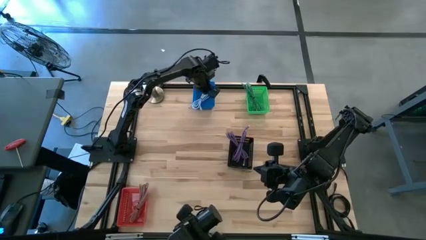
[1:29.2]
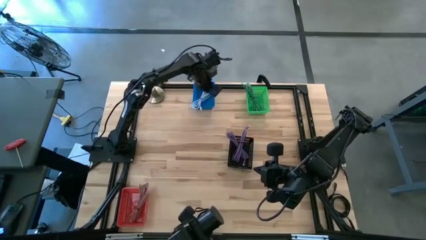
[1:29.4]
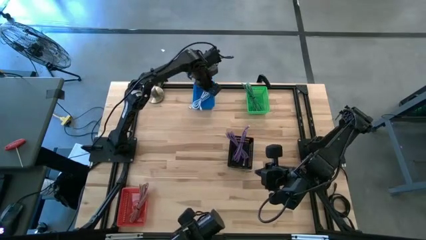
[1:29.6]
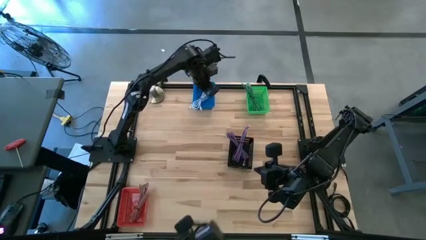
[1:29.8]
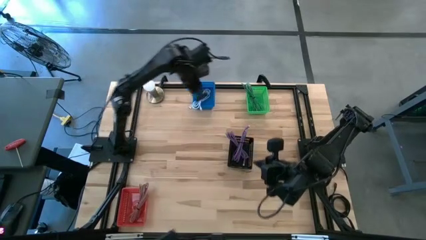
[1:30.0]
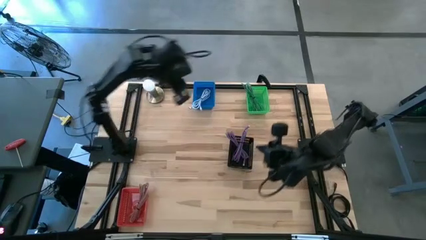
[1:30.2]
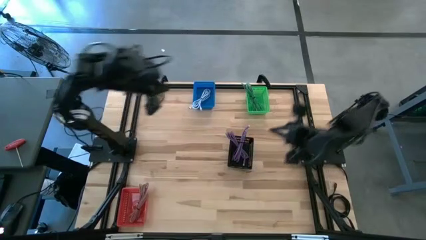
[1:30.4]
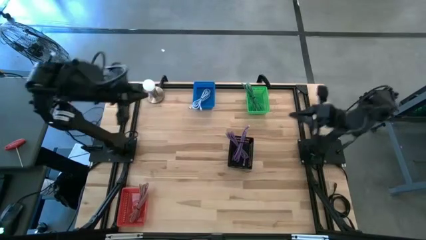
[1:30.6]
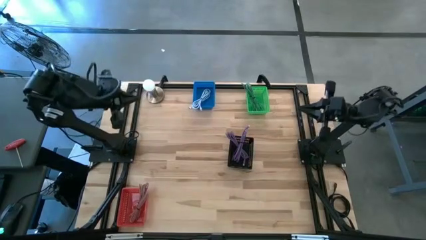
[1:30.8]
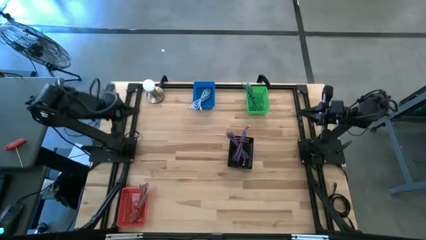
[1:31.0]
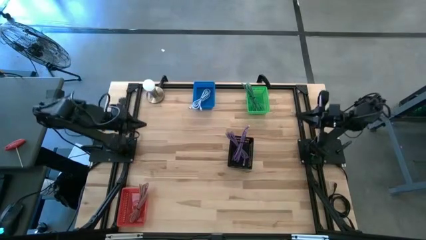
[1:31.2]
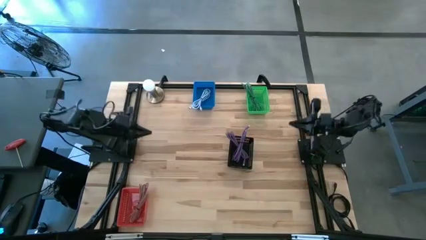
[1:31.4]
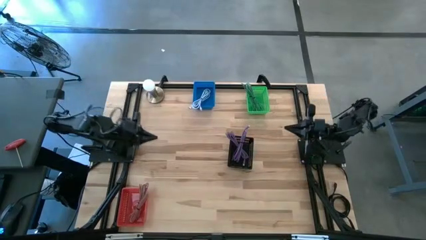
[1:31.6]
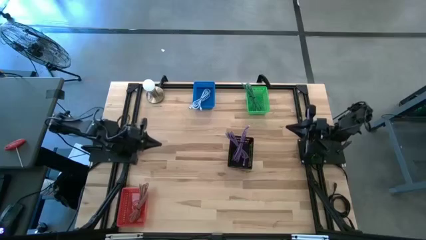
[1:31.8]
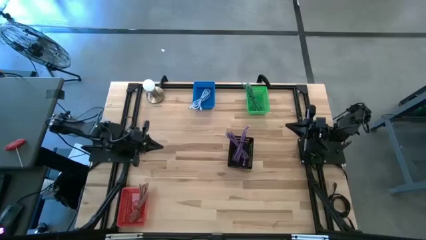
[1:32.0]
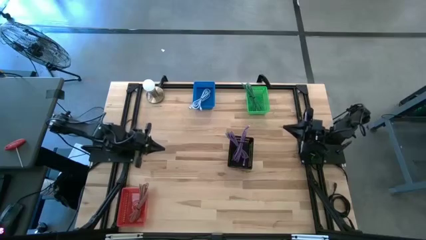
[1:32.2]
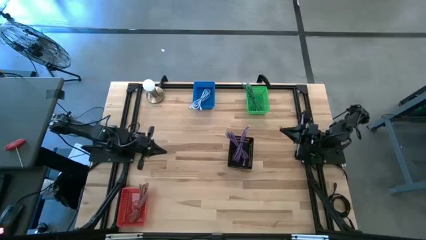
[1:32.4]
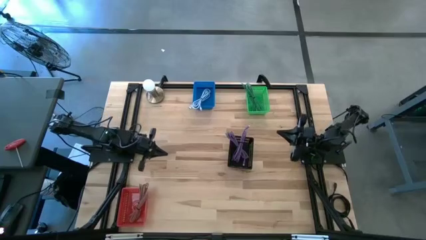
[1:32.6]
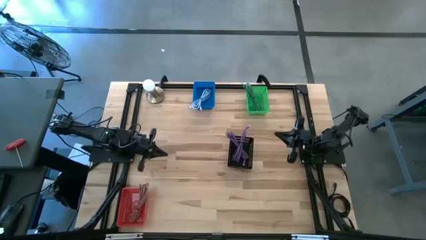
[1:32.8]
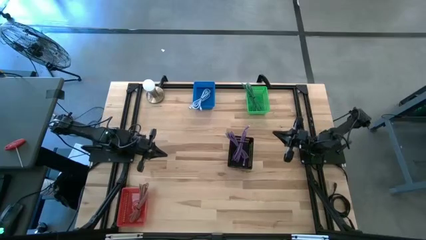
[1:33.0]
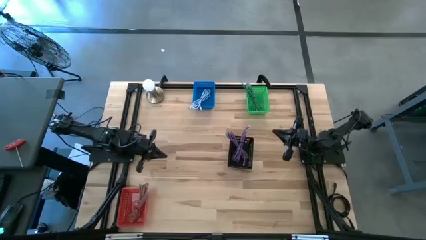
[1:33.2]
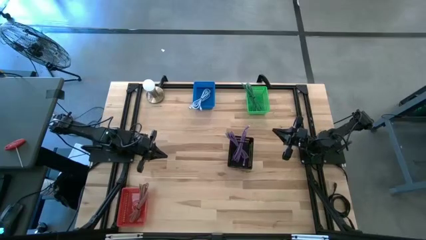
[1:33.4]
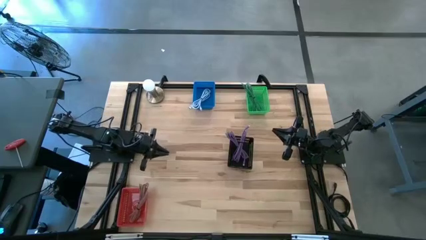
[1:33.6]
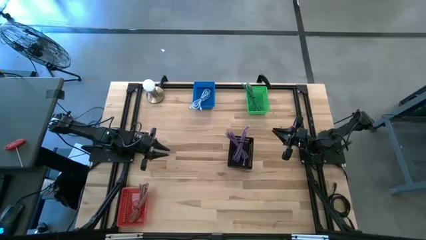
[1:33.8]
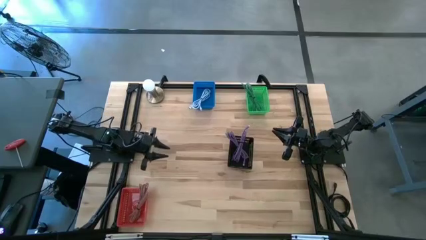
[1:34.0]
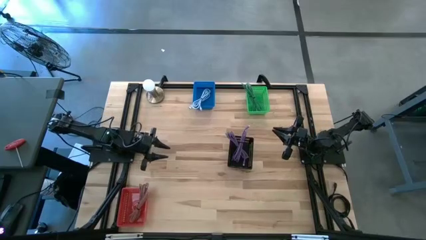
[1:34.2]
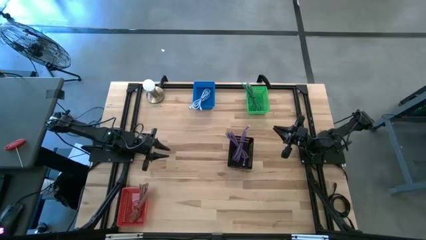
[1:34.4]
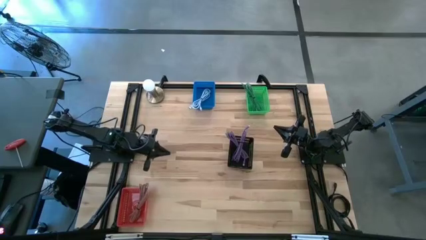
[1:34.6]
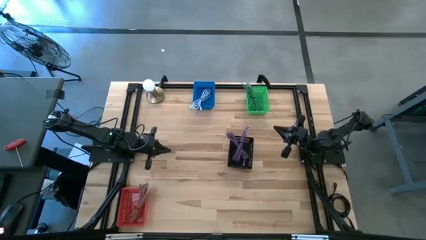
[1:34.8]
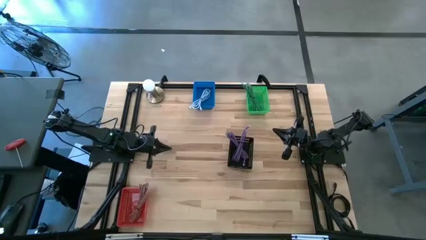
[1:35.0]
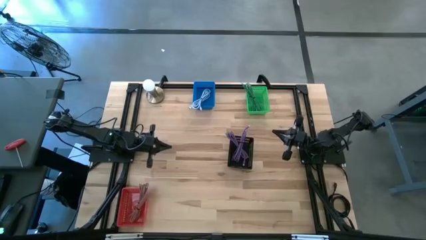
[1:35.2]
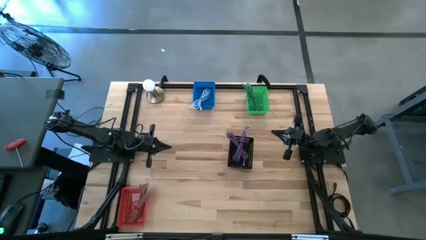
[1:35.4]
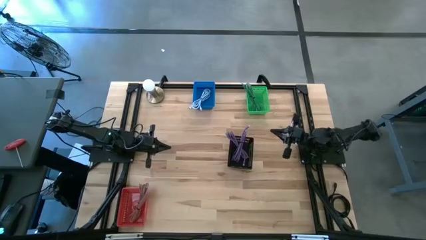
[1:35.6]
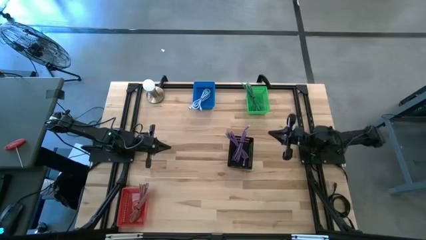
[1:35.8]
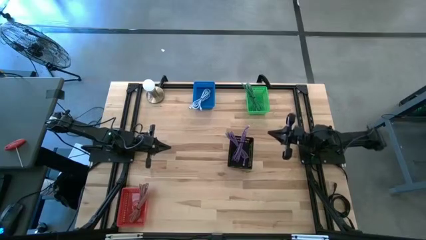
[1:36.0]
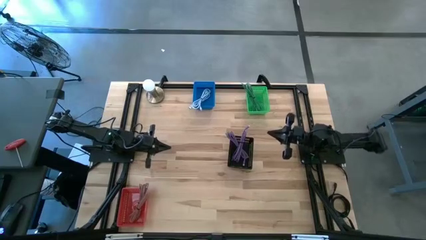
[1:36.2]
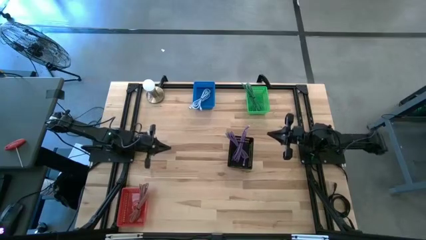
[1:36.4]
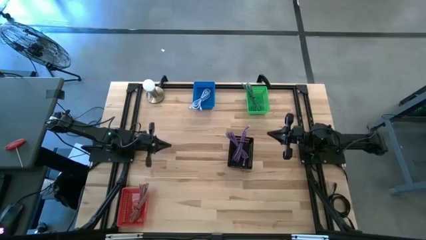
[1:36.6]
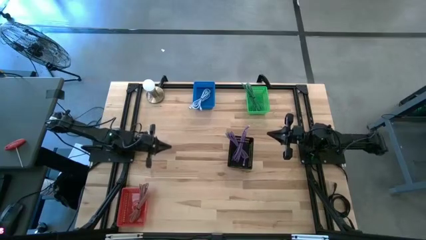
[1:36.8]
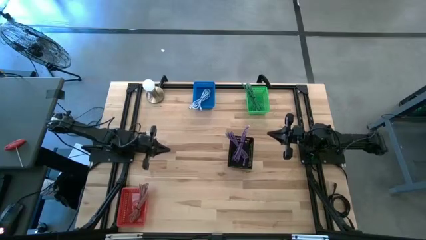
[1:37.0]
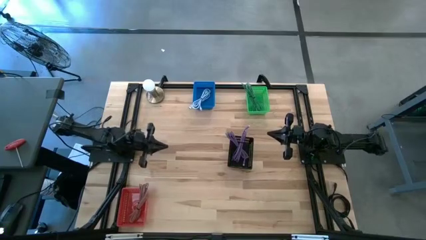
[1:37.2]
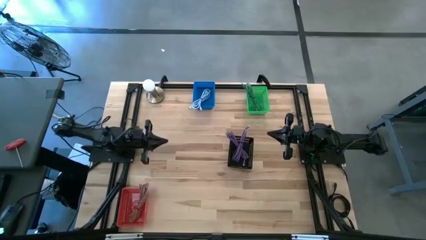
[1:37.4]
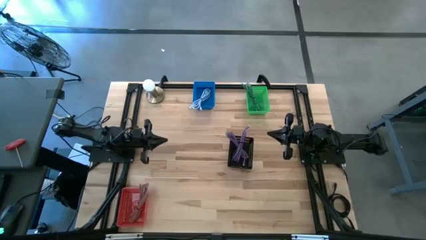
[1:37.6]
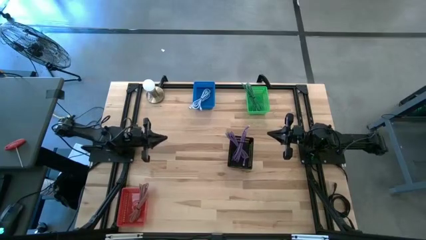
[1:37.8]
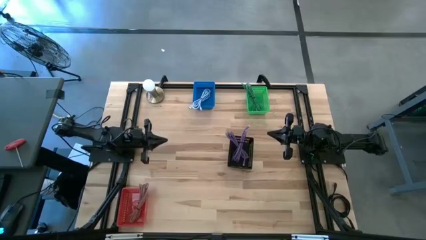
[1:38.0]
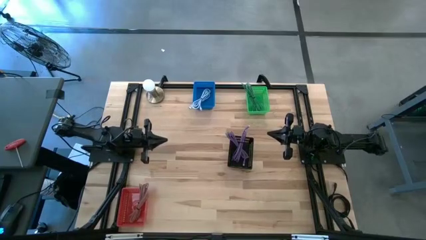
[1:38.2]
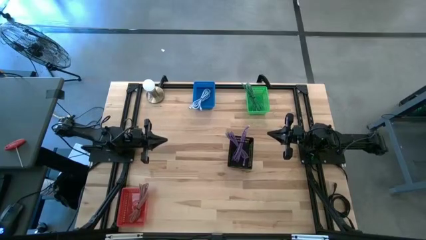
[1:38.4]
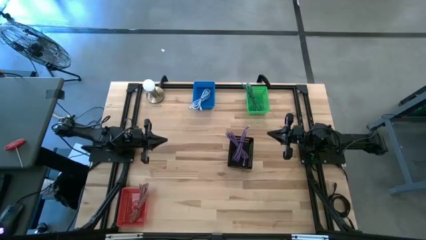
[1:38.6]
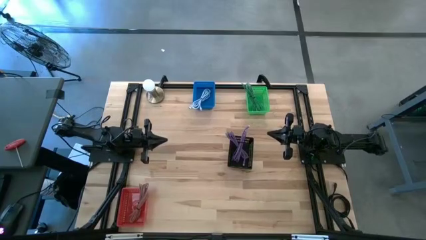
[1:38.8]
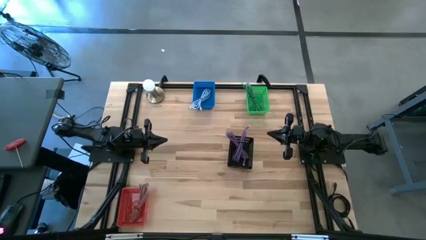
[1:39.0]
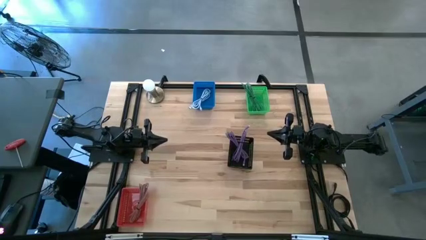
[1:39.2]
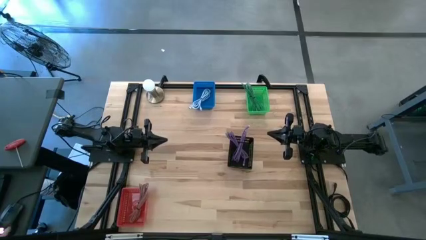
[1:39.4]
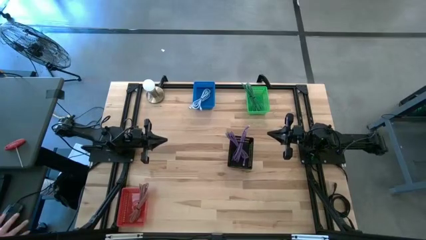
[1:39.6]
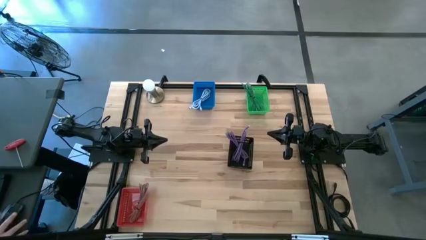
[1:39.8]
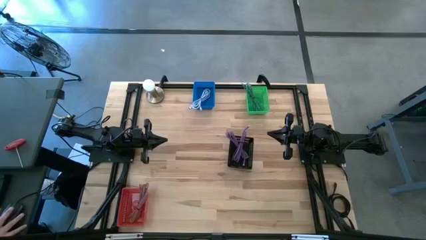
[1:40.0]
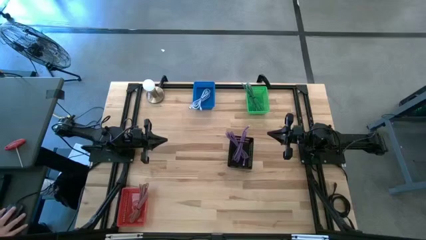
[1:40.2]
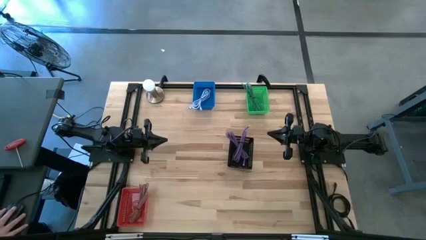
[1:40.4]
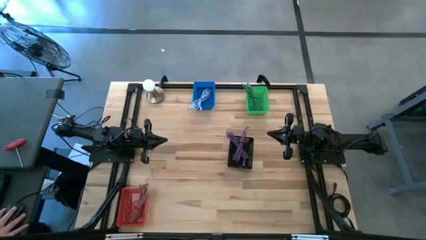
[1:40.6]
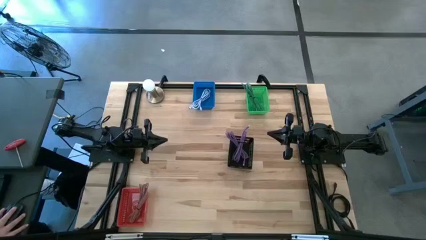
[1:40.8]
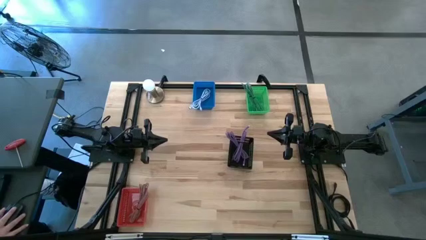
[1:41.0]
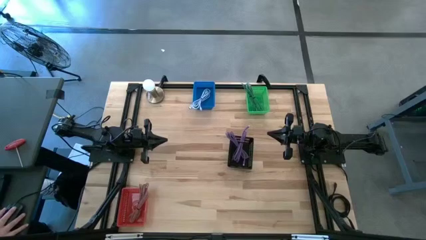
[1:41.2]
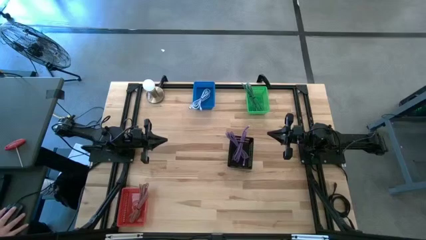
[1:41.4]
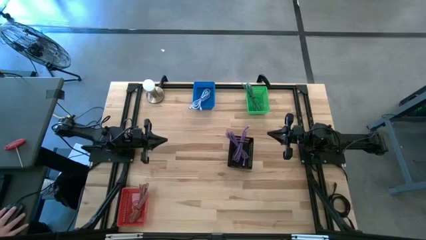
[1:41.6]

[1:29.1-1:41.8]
Task: Pick & Place USB Port
Return to Home Position
